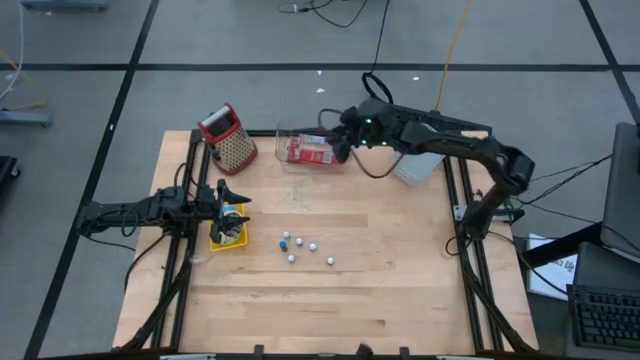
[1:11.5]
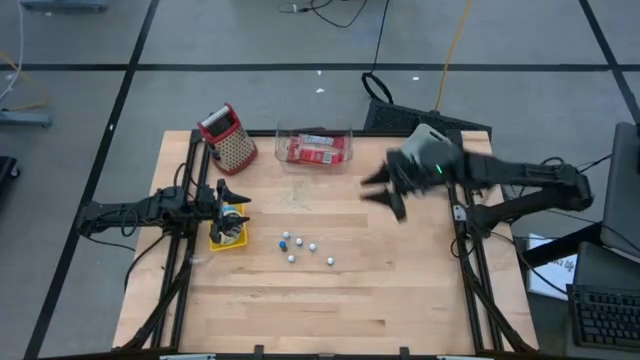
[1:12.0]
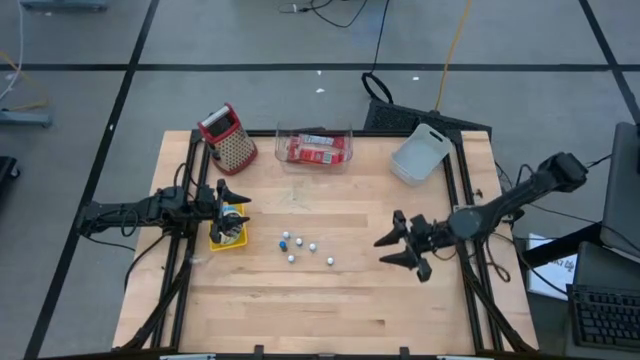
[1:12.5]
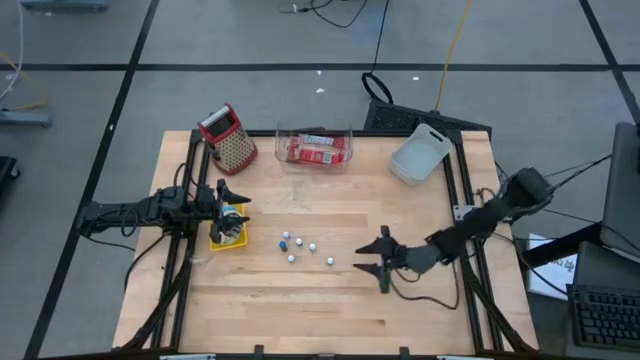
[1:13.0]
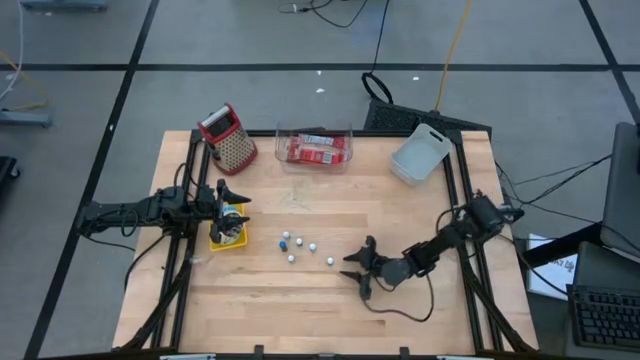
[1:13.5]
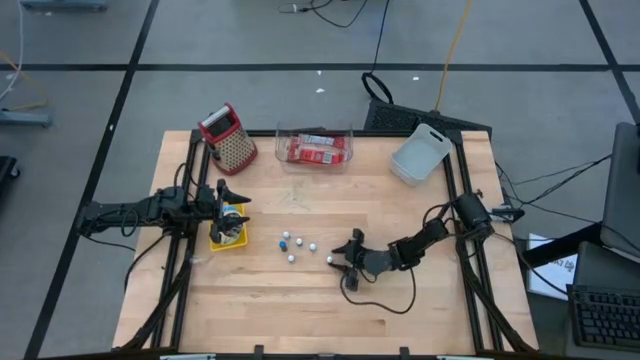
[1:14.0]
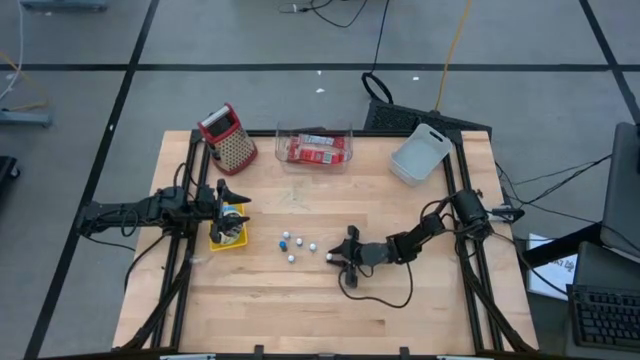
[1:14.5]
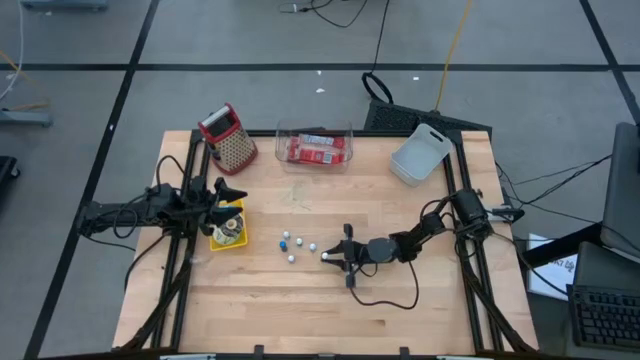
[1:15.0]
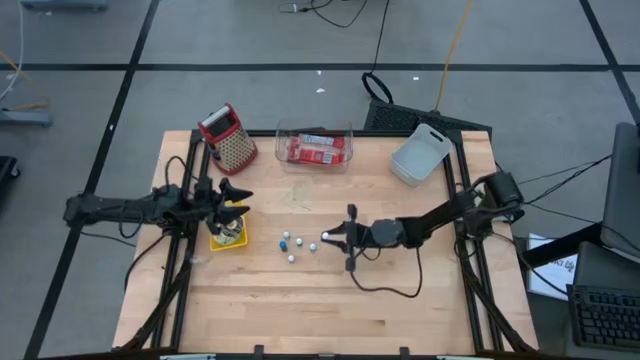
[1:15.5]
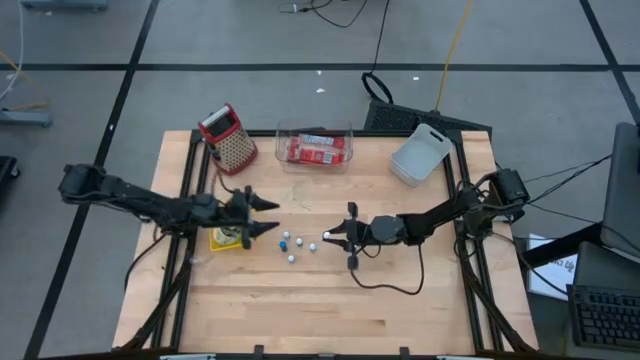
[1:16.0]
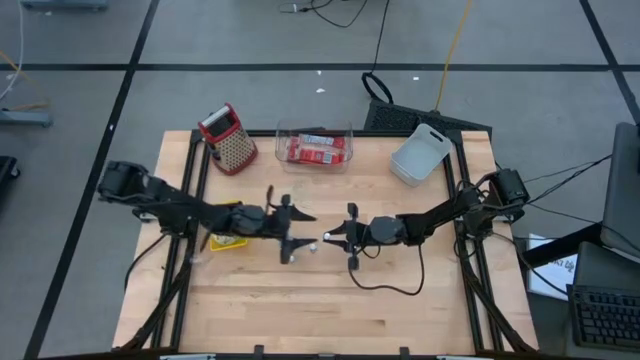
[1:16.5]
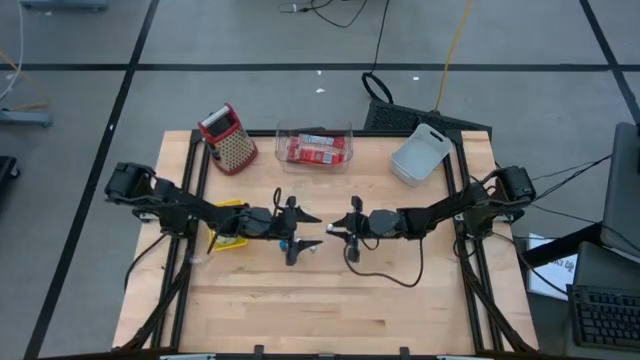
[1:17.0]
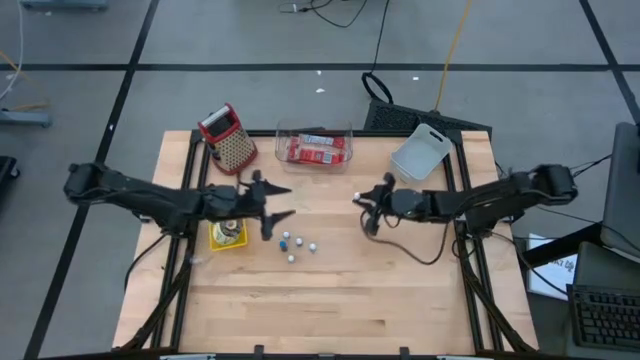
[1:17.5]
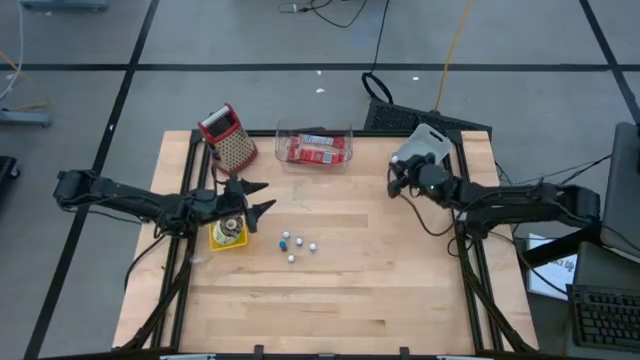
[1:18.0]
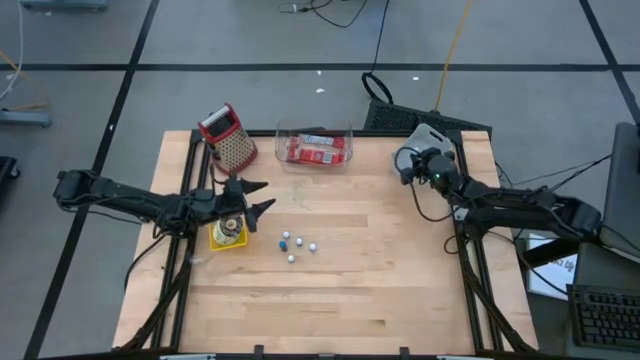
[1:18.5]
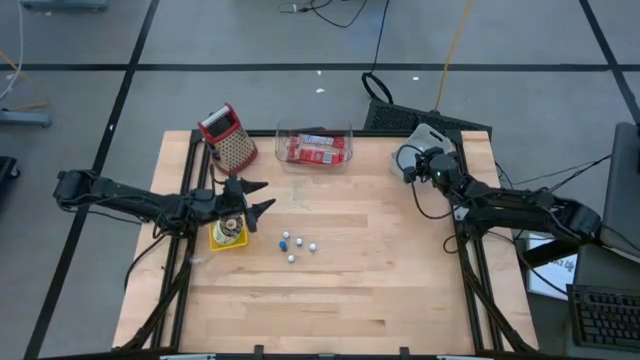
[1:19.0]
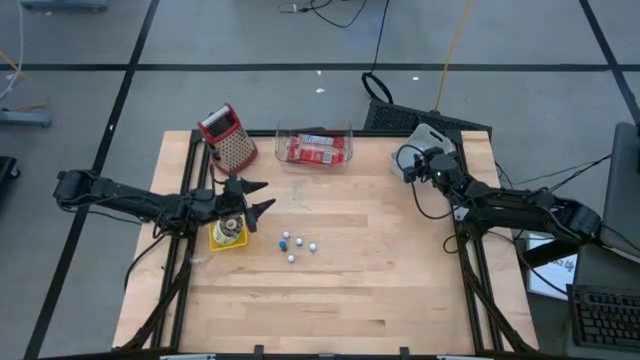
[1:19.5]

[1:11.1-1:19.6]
Put the yellow food coloring bottle into the white bin

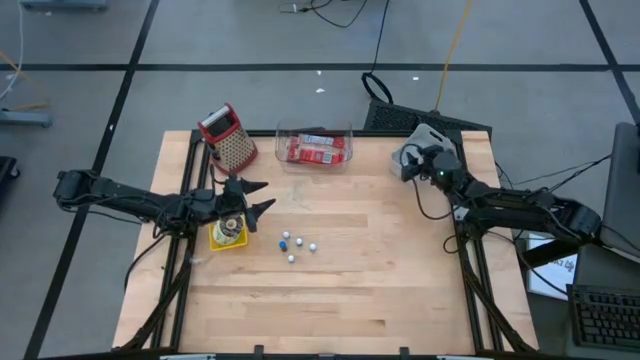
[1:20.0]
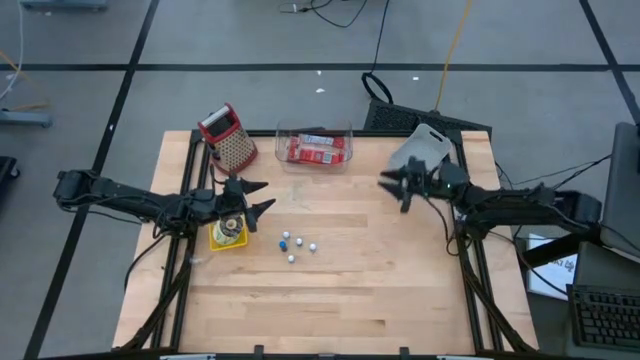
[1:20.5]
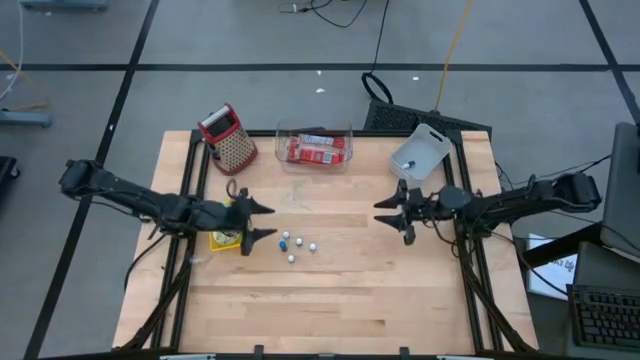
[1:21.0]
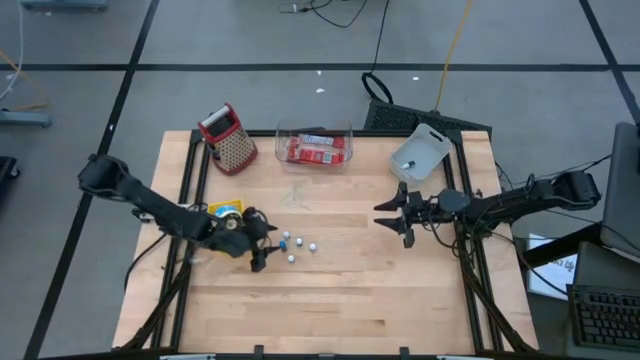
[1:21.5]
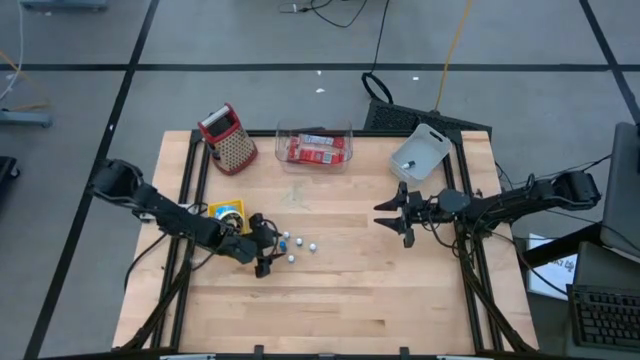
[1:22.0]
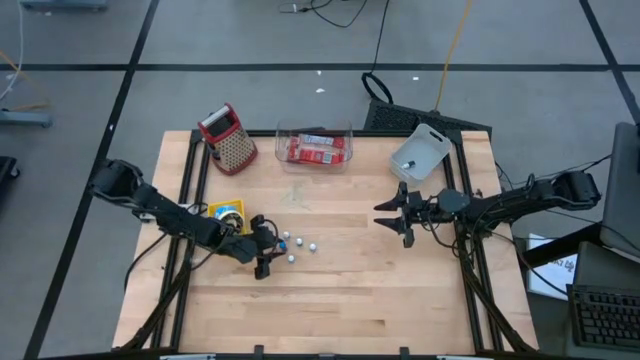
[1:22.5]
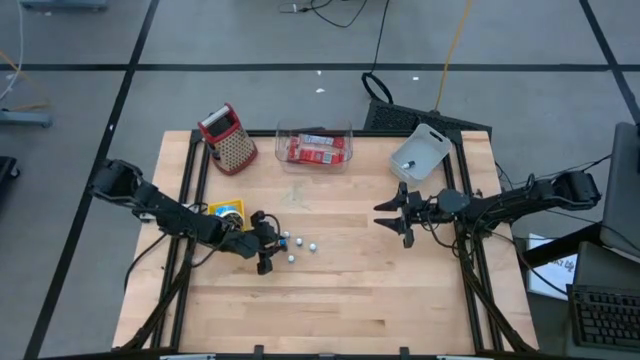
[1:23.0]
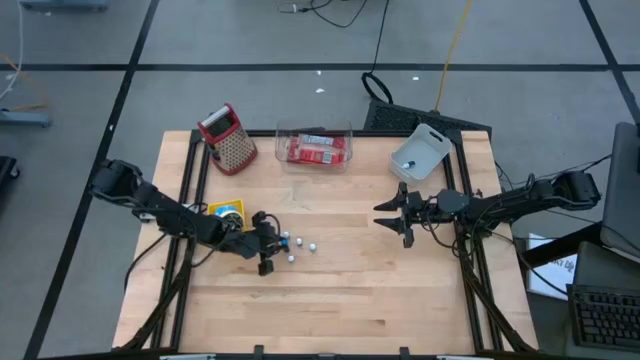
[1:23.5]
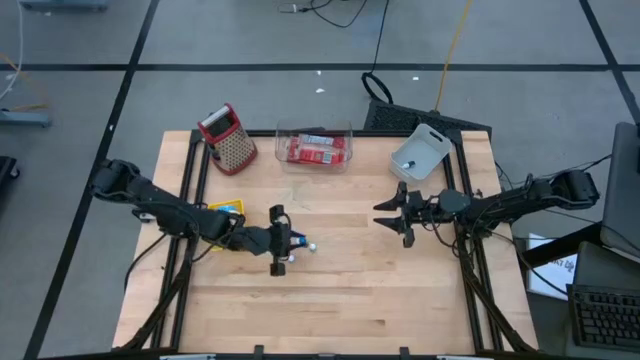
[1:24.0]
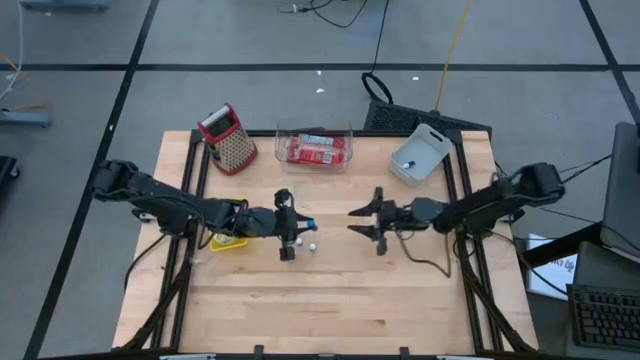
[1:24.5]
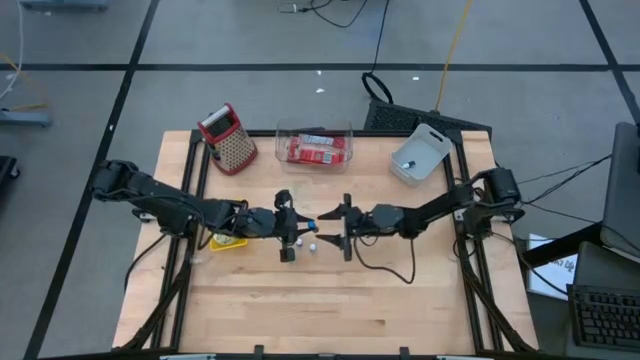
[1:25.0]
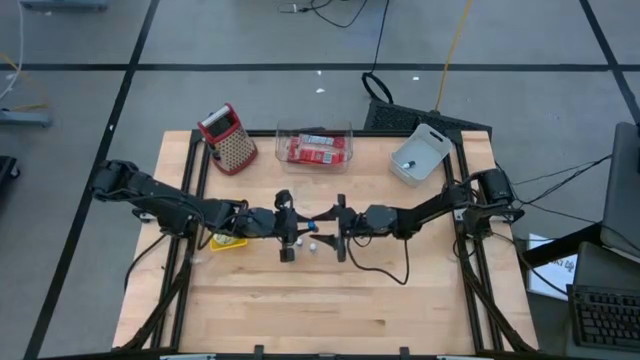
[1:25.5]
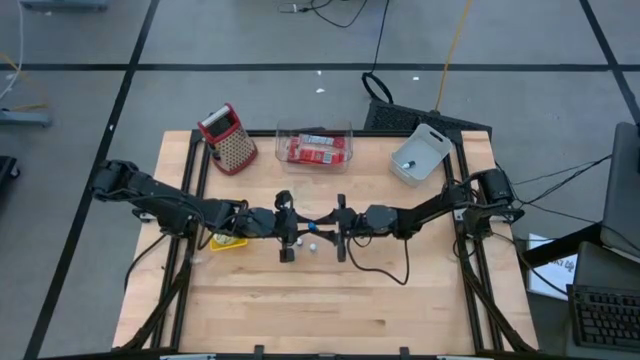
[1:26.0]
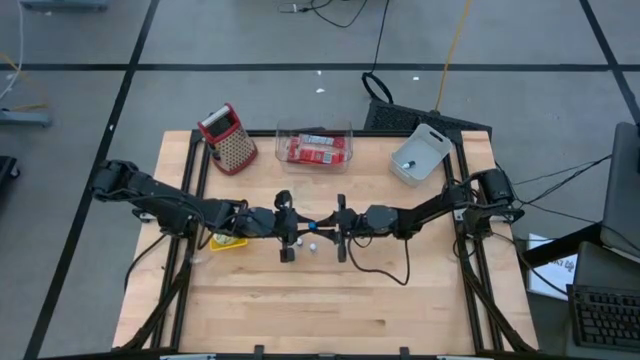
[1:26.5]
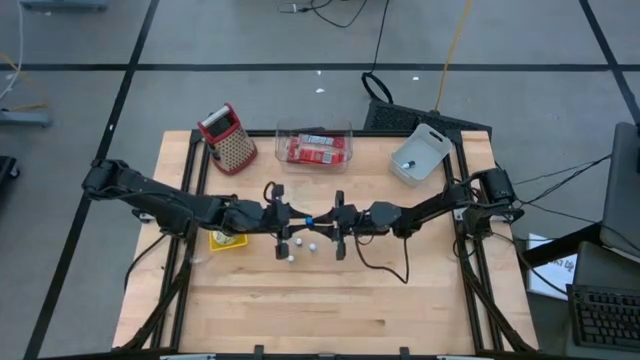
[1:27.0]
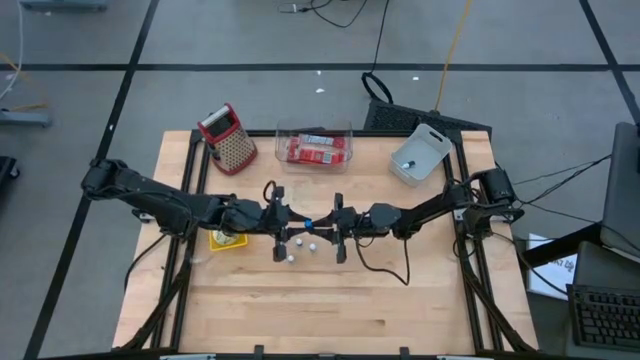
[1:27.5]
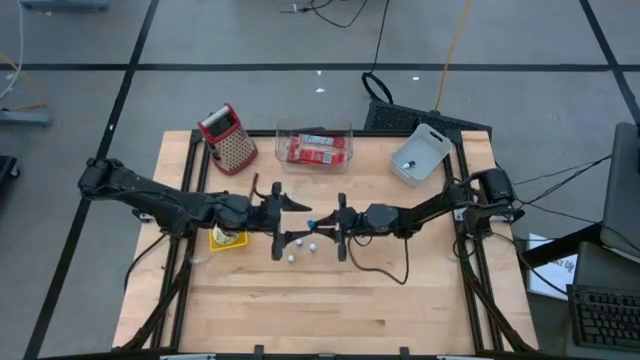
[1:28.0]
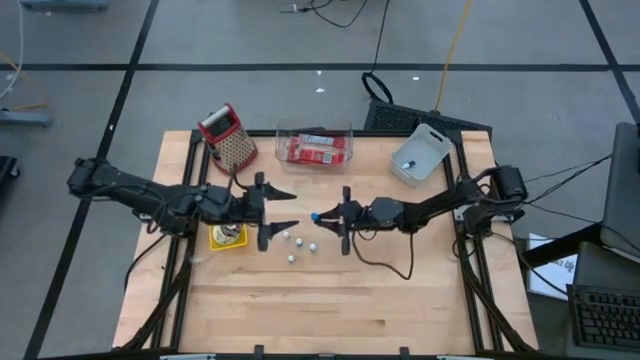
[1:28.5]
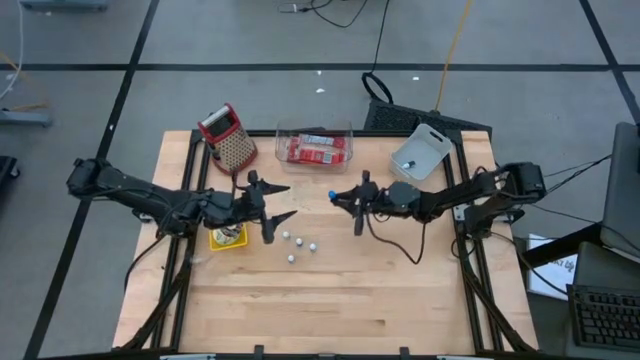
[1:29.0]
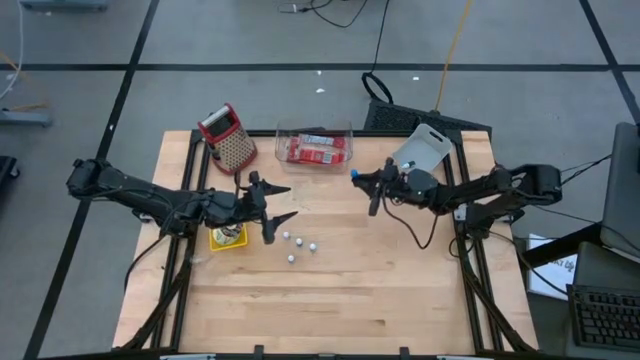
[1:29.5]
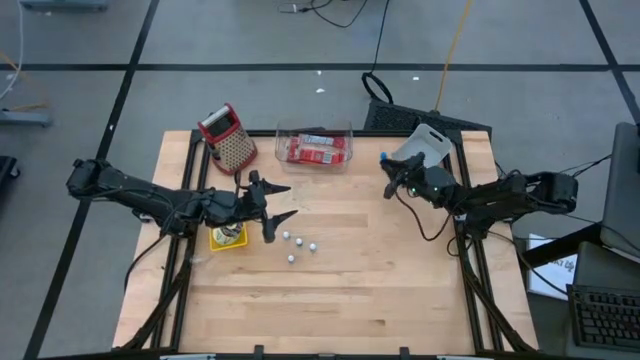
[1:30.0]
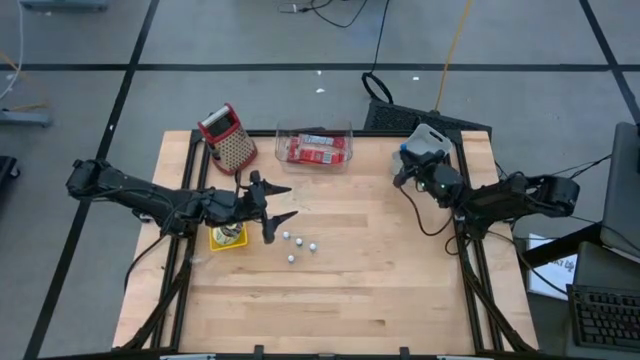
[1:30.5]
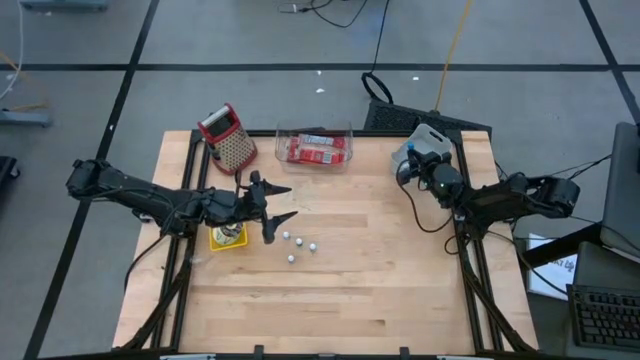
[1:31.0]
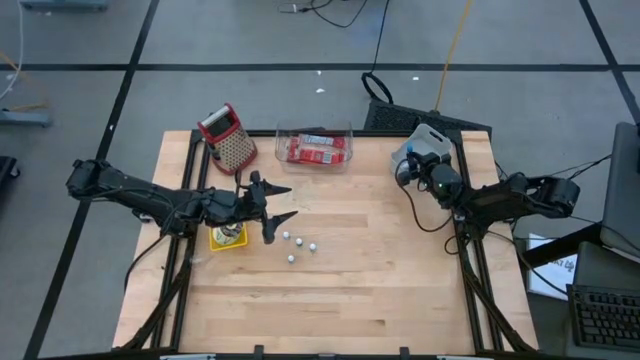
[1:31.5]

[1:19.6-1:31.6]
Put the blue food coloring bottle into the white bin
